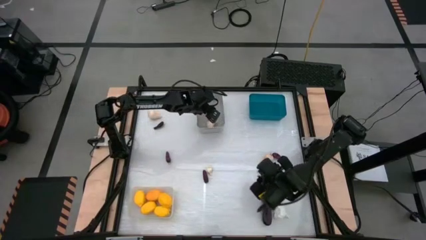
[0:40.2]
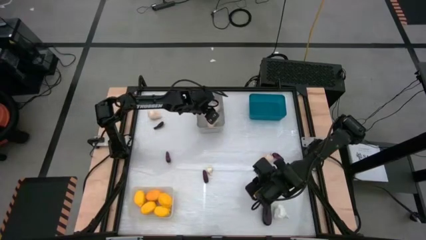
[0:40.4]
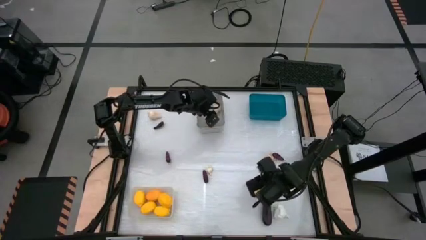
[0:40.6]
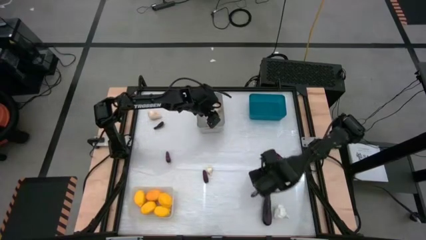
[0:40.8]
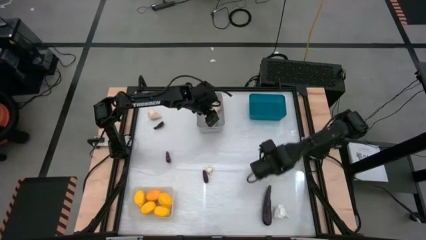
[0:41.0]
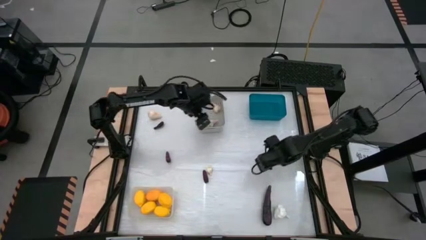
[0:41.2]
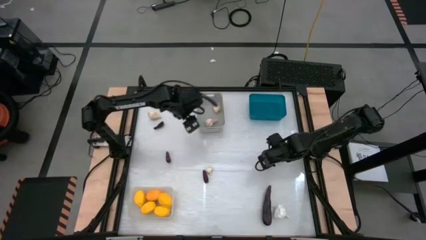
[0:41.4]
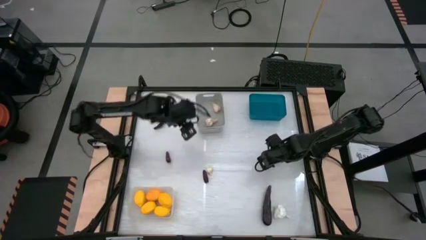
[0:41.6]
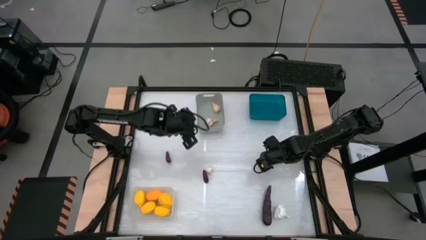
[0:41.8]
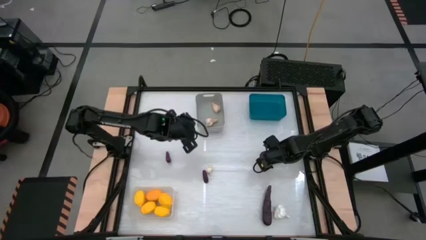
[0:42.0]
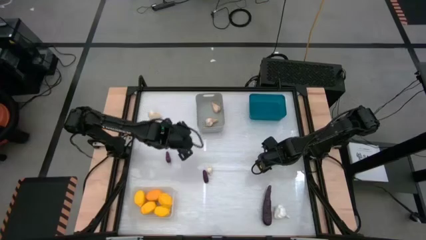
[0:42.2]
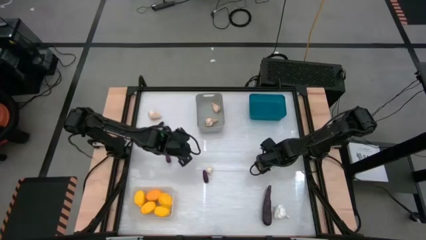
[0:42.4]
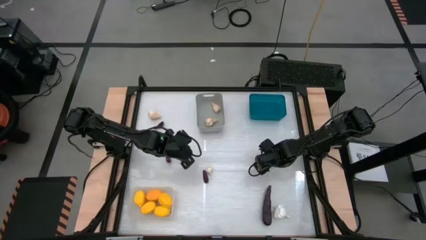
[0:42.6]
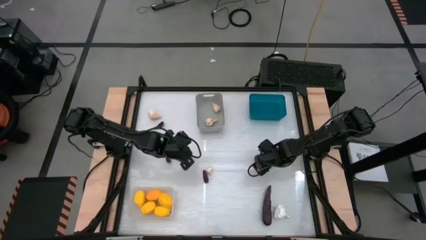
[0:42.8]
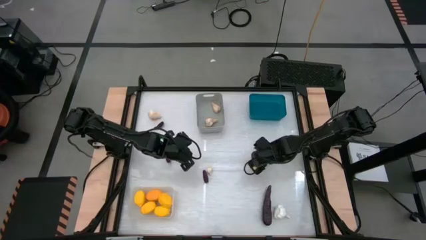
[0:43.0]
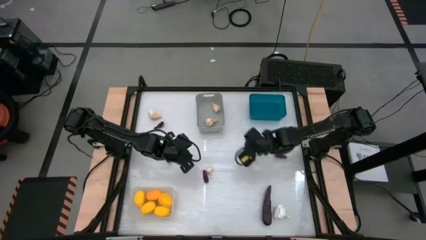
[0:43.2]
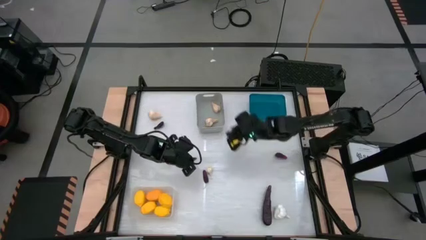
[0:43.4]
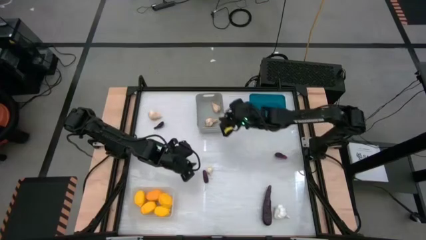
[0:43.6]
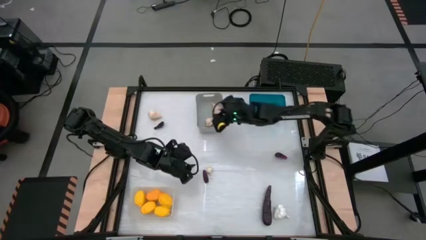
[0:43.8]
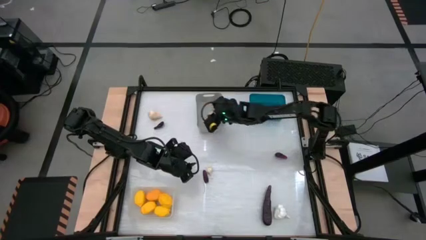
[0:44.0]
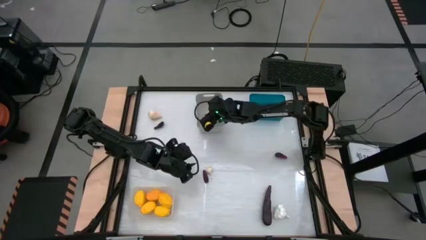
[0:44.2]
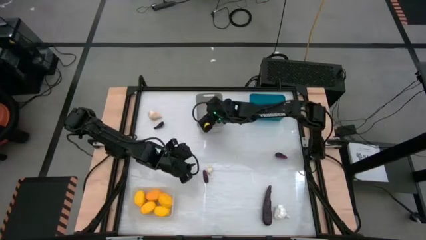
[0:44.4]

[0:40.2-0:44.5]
Task: Sort produce into baskets
Put the garlic into the white bin

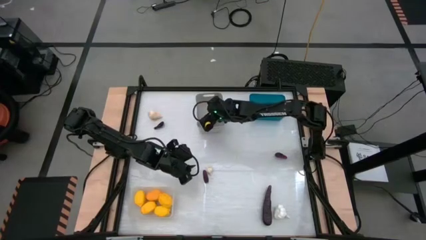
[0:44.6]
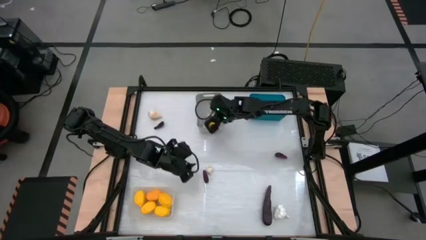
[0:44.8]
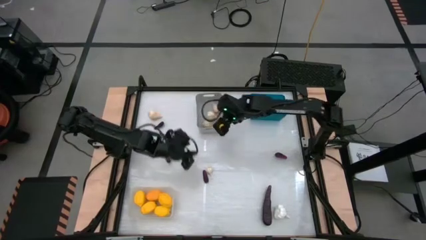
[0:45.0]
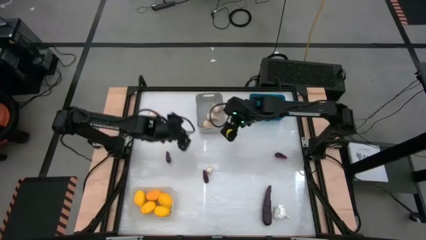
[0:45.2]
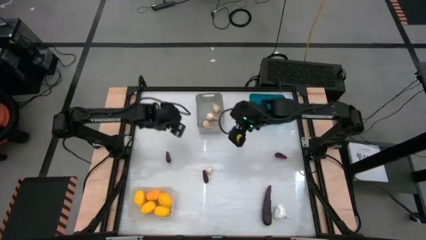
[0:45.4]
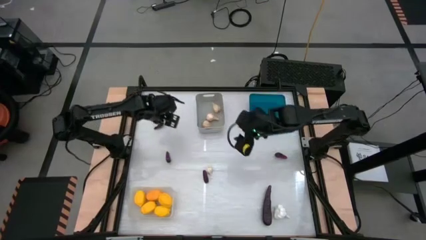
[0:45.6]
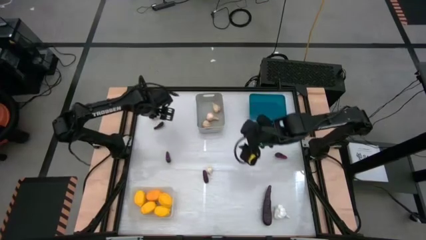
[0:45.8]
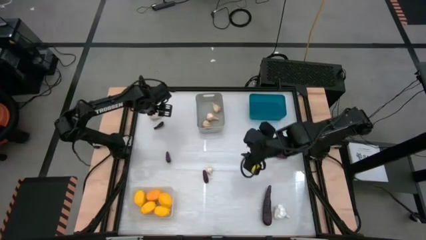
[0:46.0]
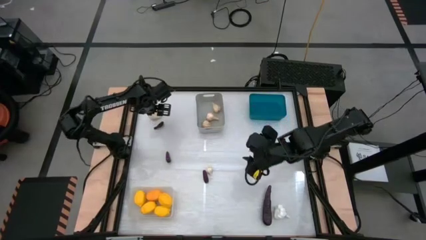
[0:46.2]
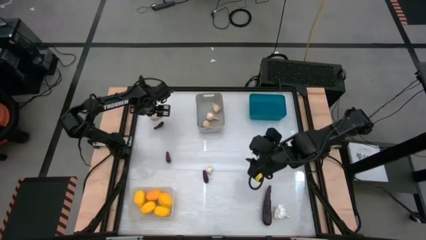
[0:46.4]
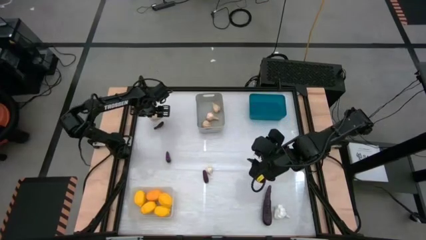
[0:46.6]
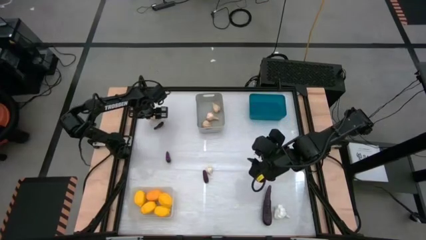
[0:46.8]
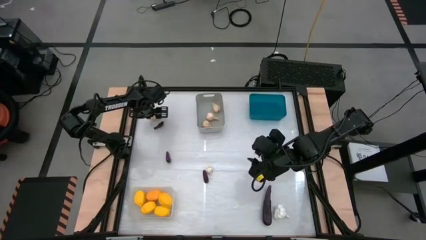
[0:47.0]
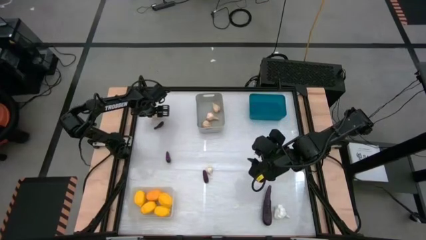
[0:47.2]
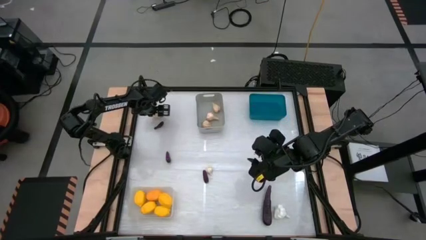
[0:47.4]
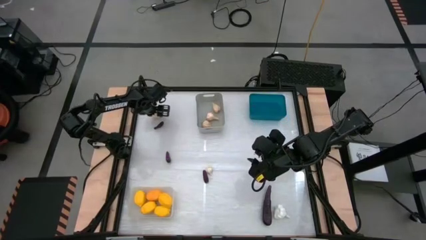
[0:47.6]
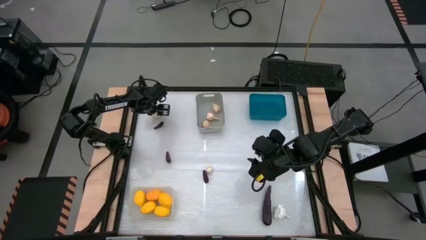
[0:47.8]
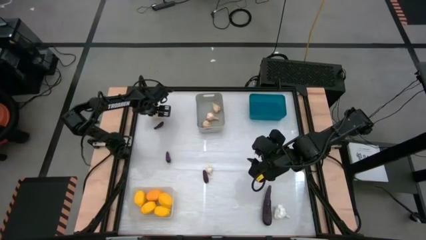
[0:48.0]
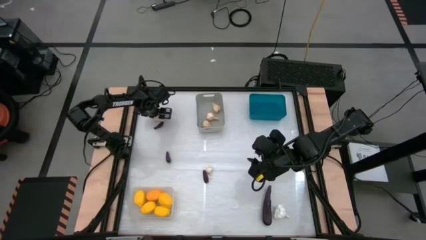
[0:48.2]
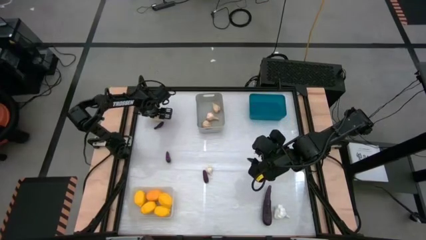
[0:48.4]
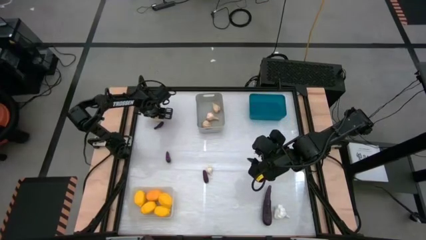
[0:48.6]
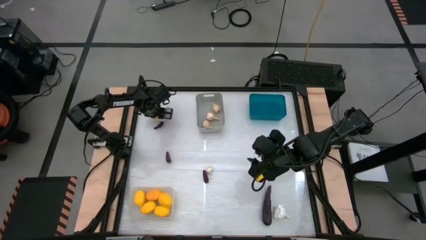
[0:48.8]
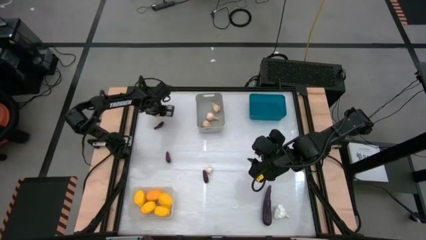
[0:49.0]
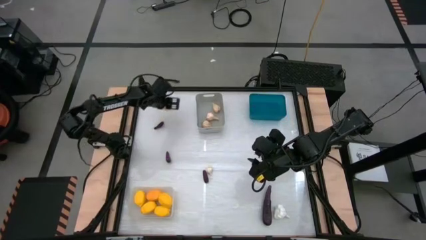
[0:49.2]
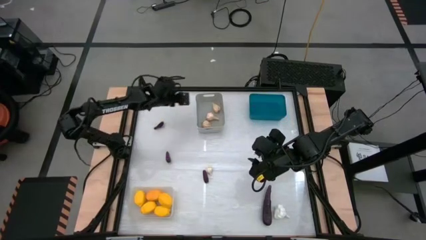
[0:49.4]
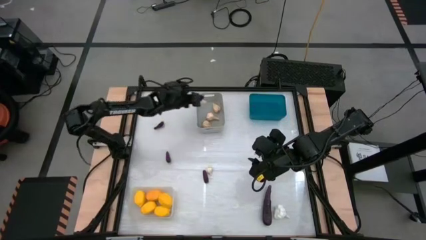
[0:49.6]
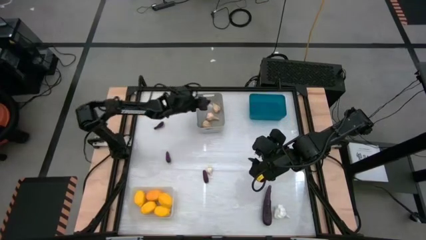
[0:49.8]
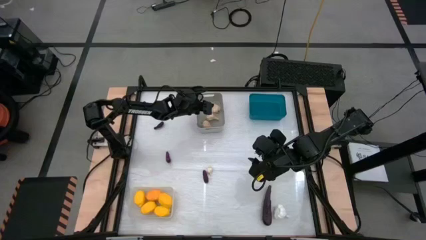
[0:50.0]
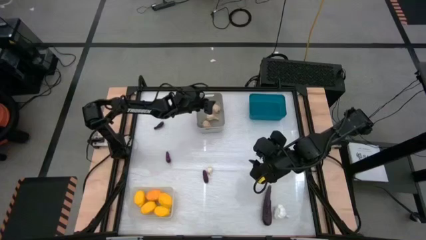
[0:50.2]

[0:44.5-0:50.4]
Put the garlic into the white bin

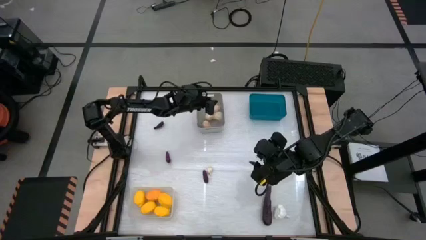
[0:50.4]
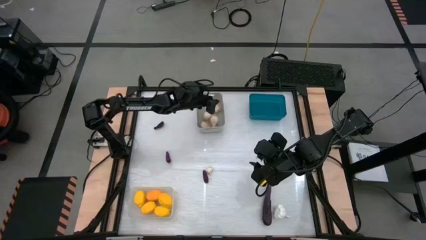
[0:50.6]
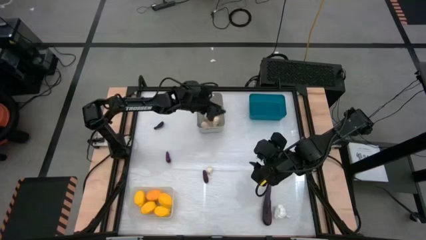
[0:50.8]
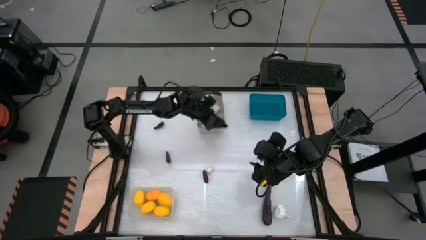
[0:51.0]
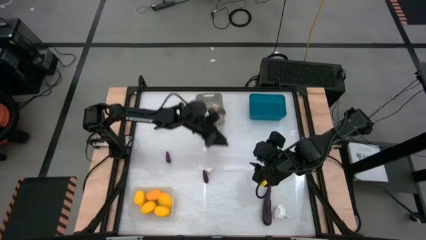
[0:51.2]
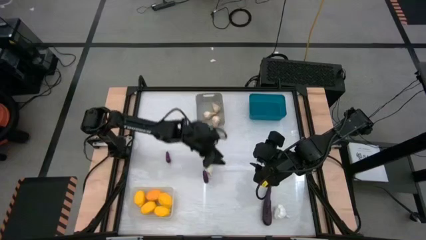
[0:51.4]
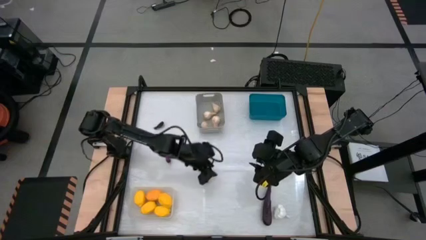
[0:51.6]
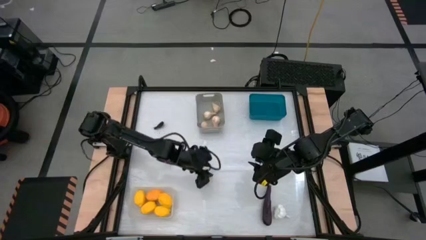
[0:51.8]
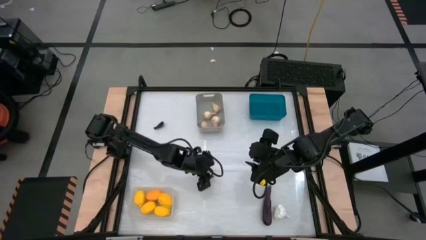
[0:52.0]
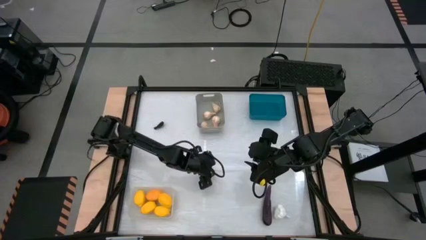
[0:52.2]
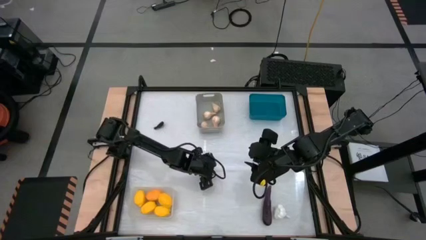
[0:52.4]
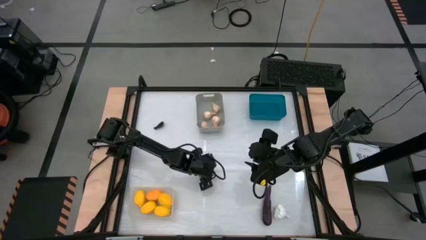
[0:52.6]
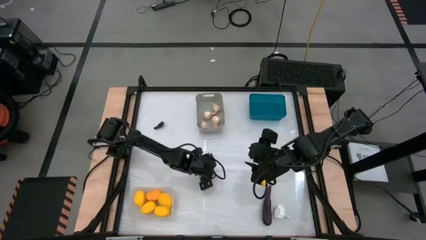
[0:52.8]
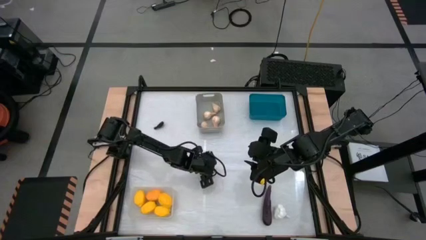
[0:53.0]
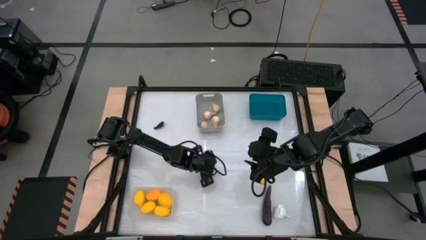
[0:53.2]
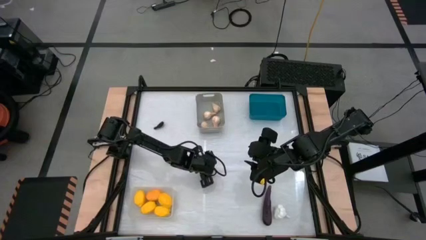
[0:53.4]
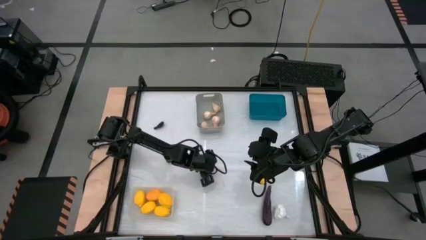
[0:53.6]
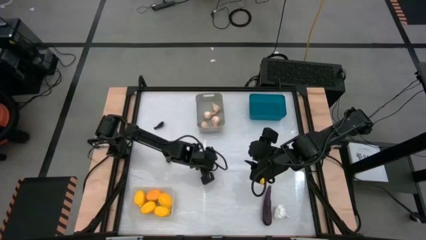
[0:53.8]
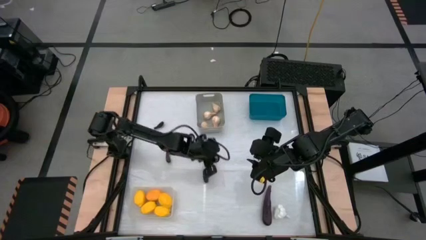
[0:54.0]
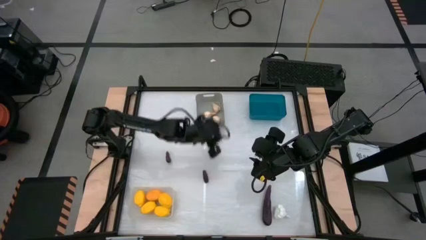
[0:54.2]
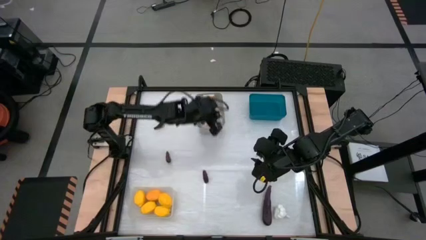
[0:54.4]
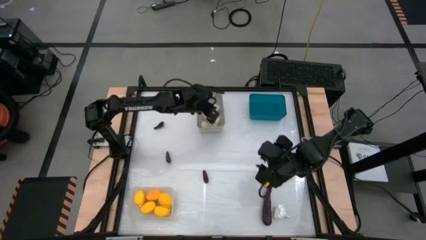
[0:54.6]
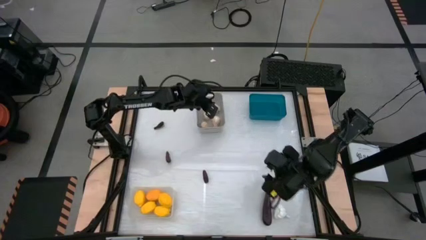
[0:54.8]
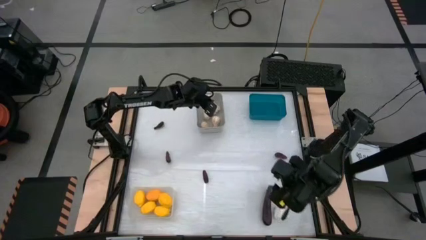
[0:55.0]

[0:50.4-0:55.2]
Put the garlic into the white bin

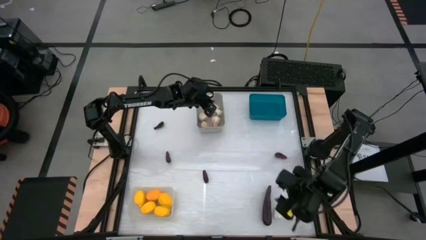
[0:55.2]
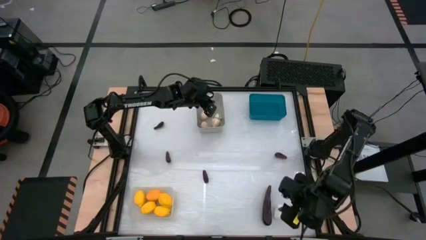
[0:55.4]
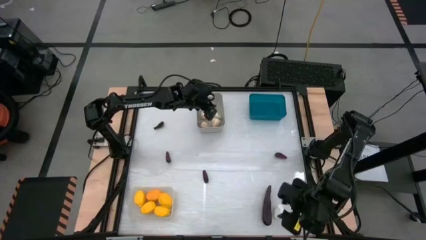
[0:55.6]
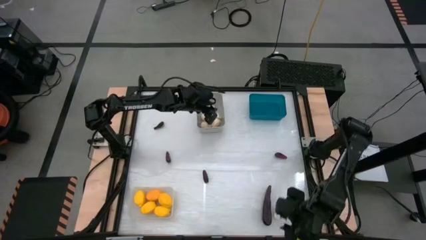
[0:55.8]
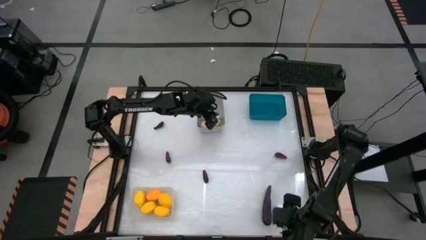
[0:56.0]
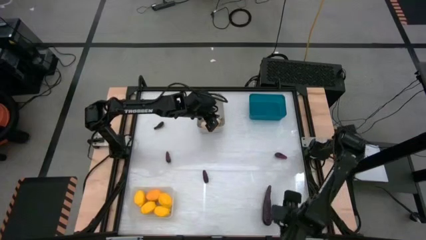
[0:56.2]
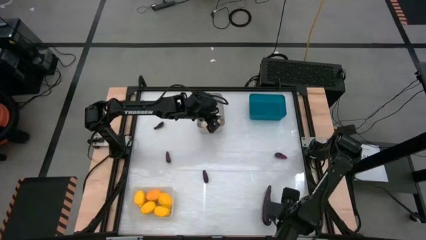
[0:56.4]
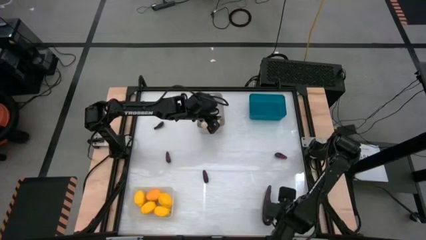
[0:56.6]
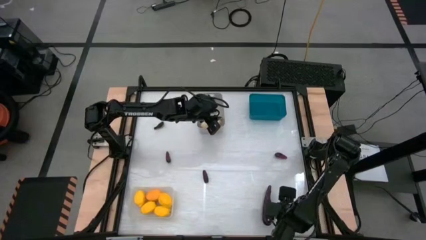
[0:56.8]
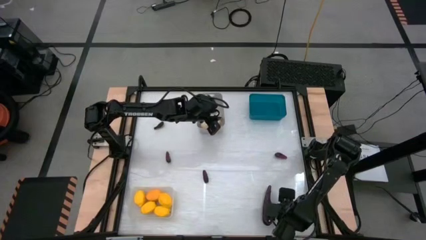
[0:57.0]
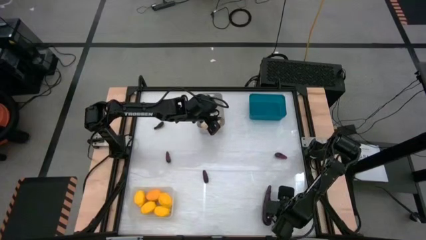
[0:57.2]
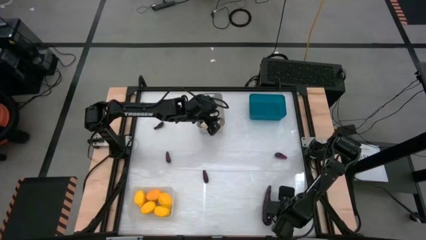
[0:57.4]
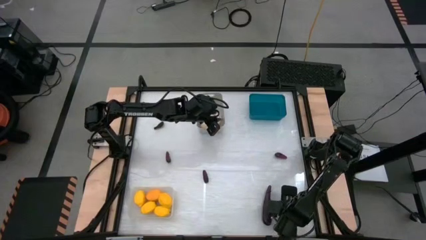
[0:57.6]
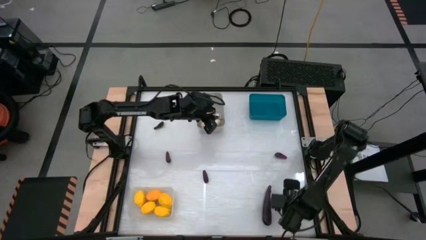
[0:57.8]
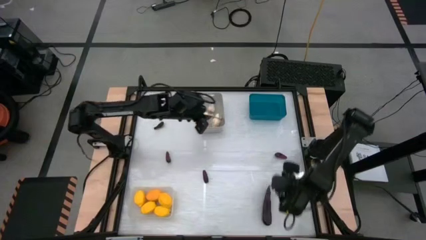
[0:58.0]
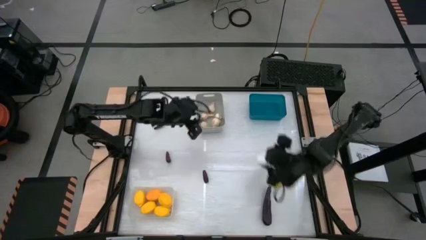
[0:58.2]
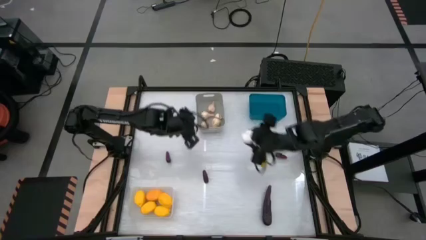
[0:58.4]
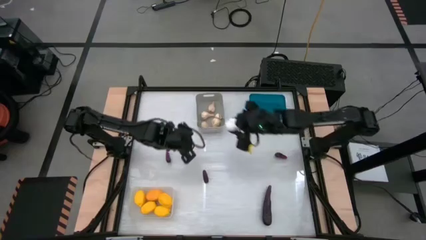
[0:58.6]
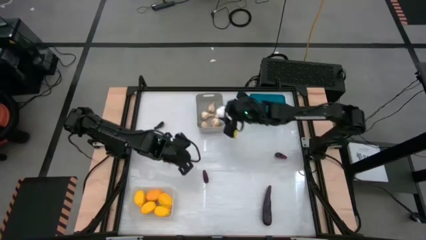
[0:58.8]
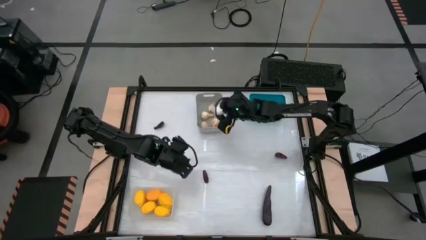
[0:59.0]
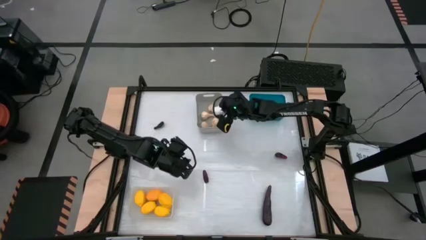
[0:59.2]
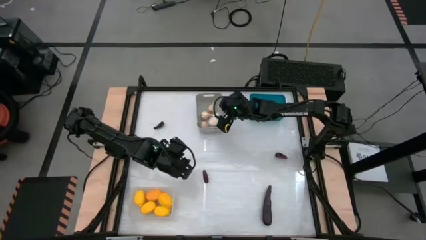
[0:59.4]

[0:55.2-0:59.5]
Put the garlic into the white bin
